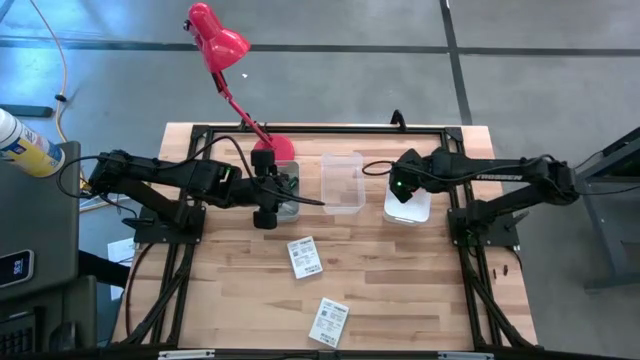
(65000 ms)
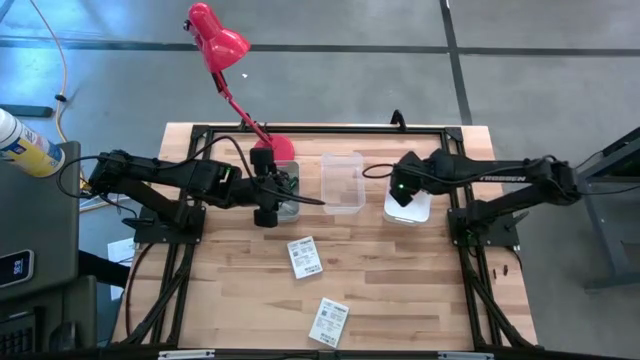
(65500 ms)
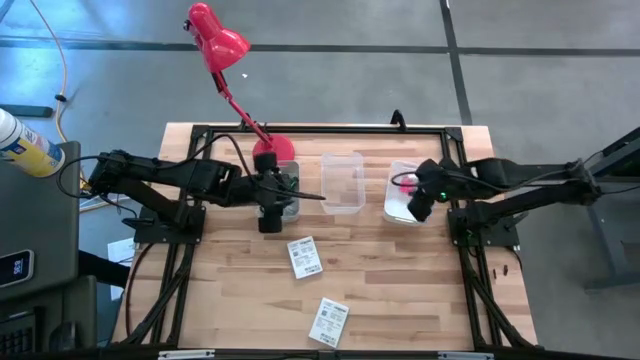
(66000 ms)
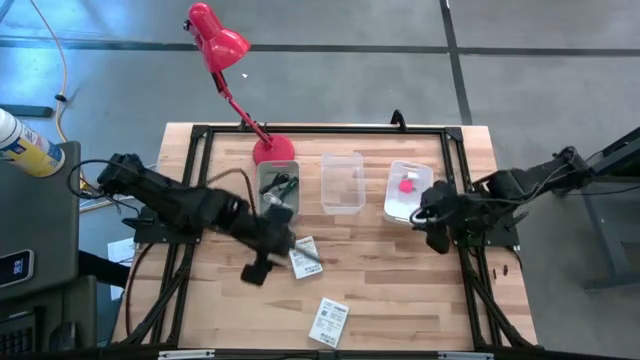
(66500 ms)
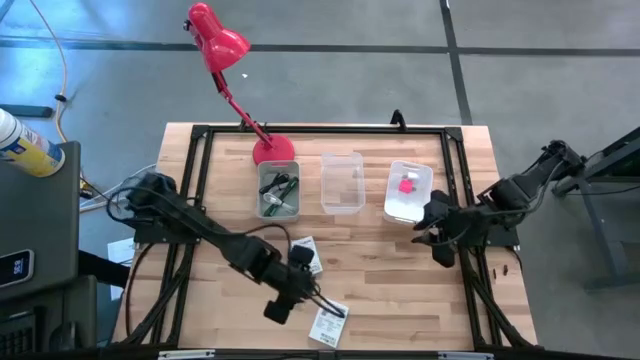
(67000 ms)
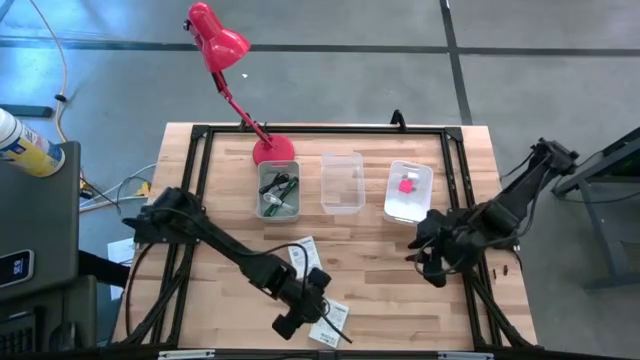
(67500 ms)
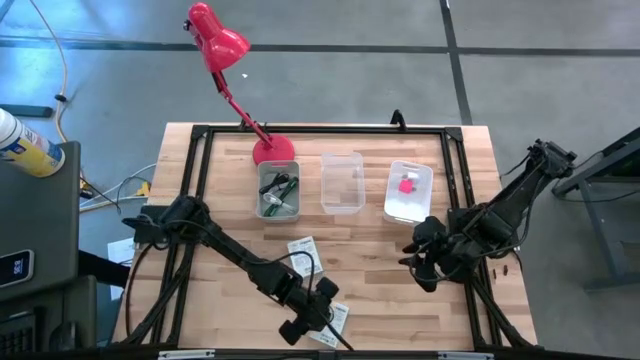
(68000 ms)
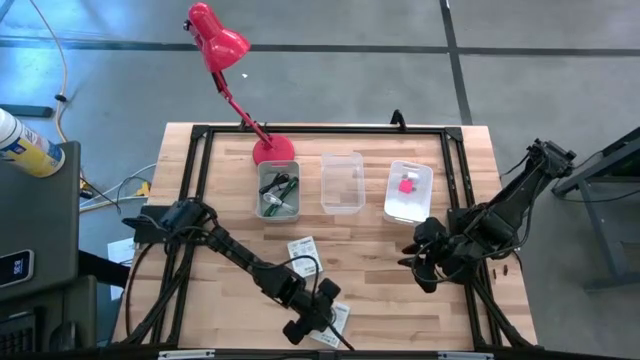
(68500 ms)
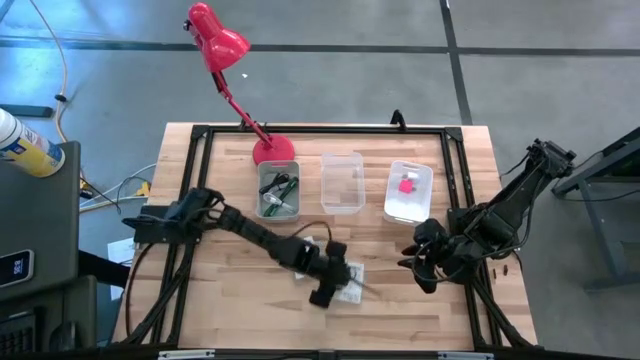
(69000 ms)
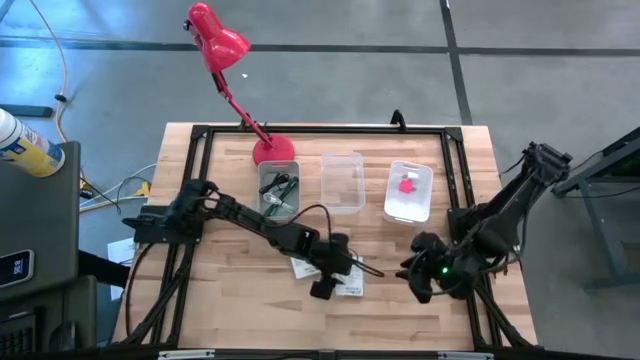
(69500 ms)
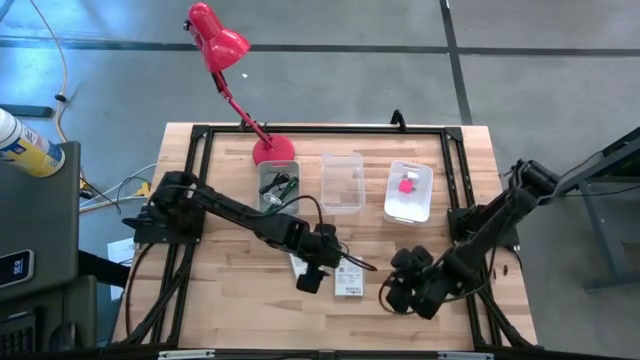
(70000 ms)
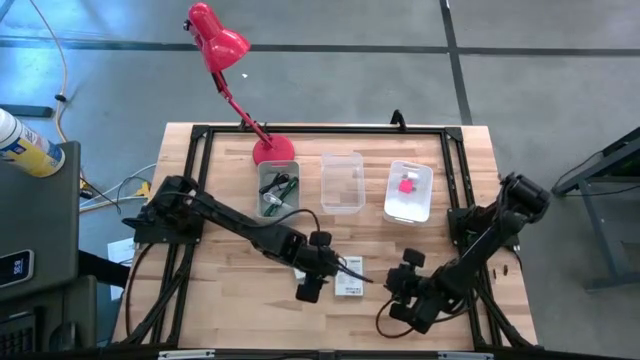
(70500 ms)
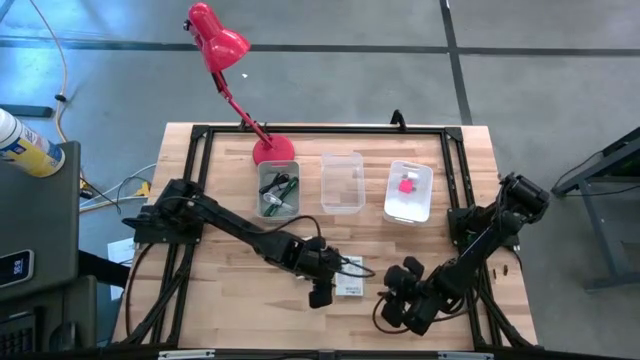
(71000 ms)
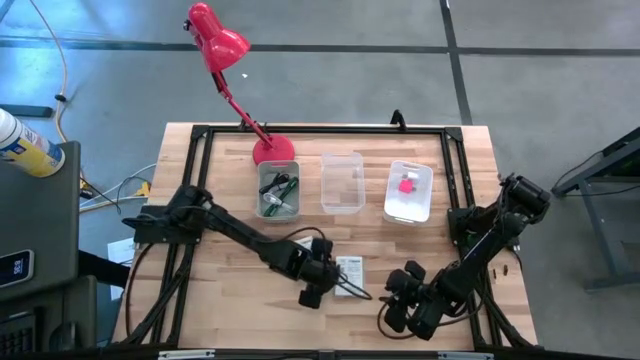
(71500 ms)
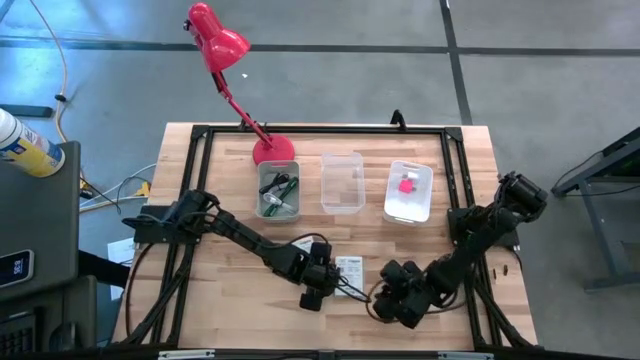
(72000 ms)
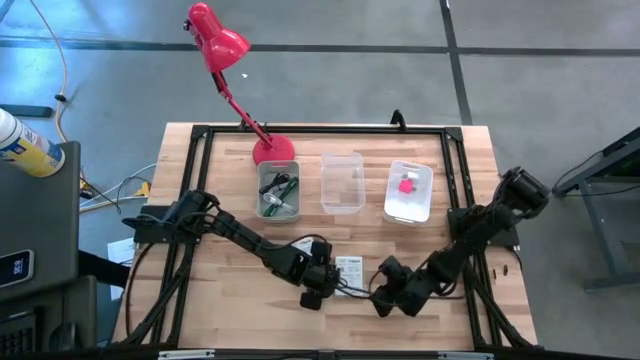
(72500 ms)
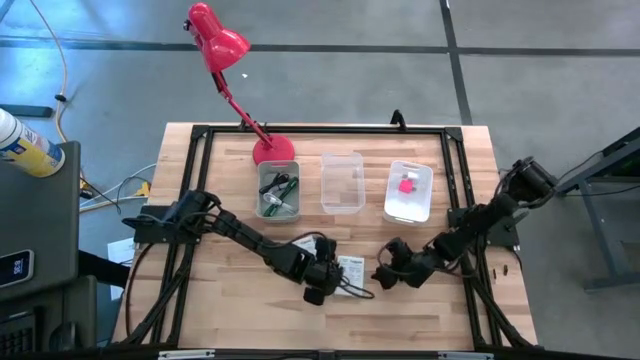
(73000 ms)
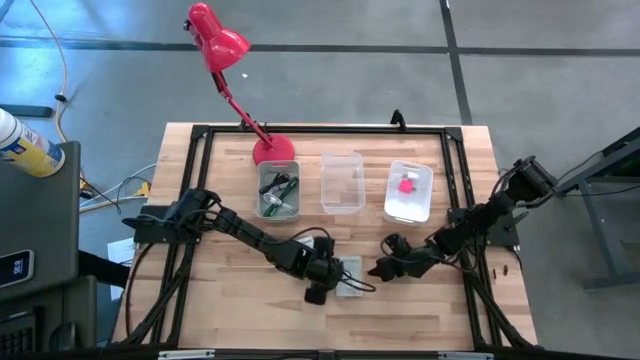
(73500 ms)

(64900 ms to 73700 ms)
Task: Pick and place items into bin
Put the right card reader box into the transparent bin

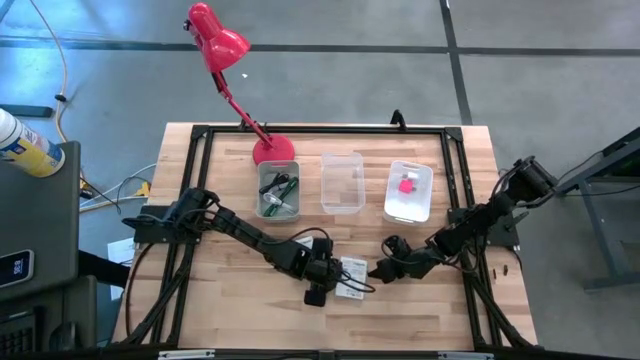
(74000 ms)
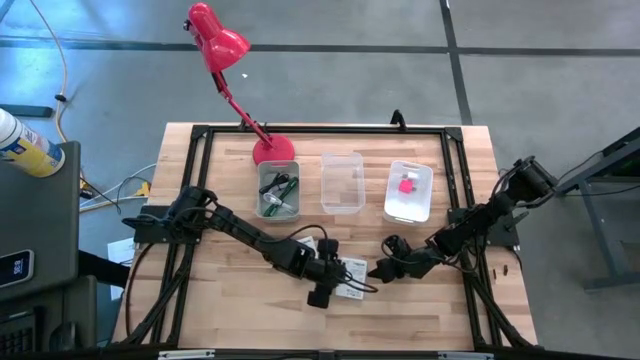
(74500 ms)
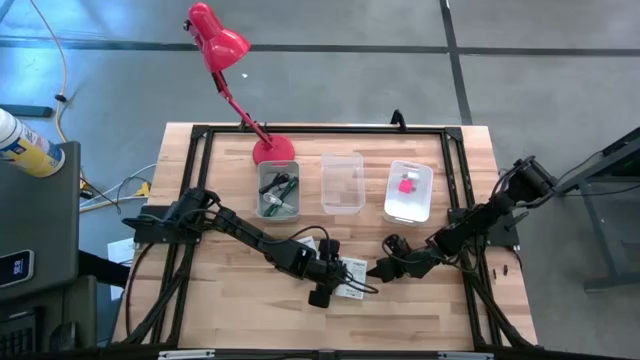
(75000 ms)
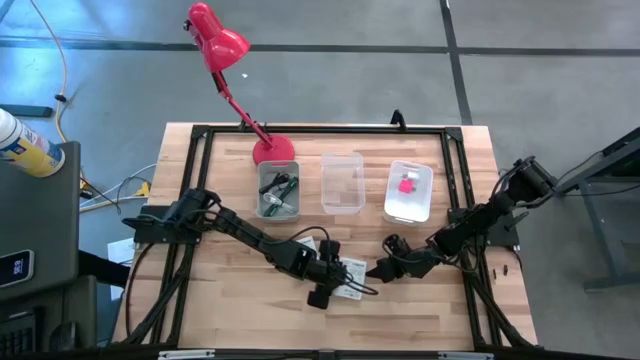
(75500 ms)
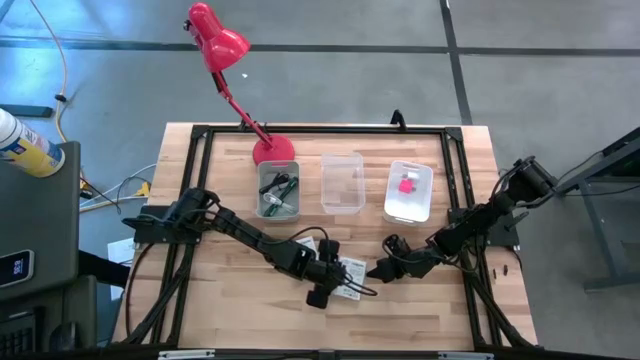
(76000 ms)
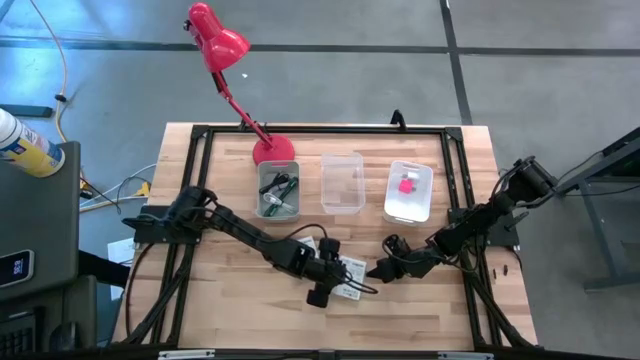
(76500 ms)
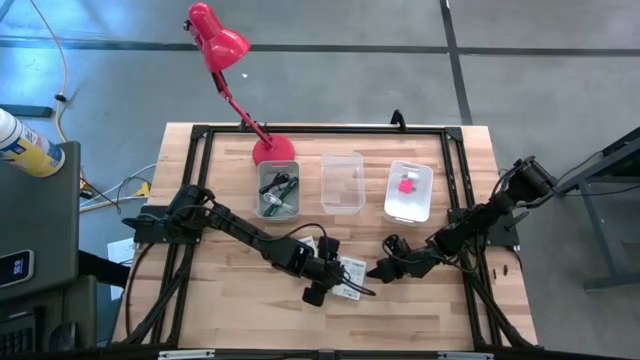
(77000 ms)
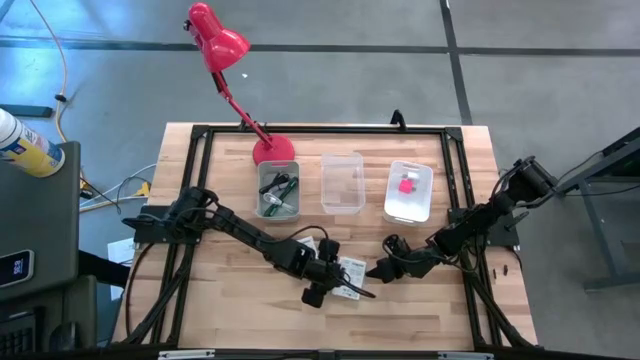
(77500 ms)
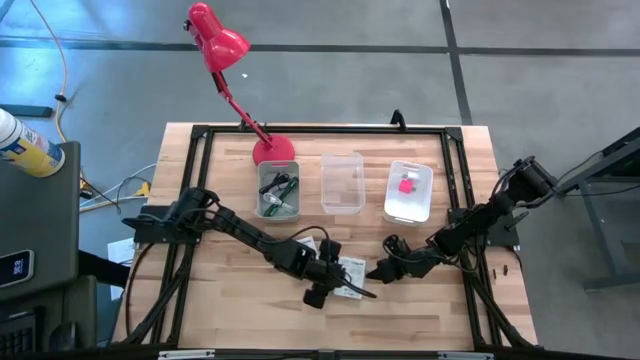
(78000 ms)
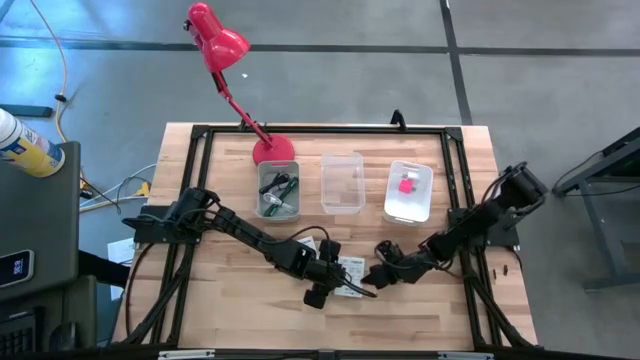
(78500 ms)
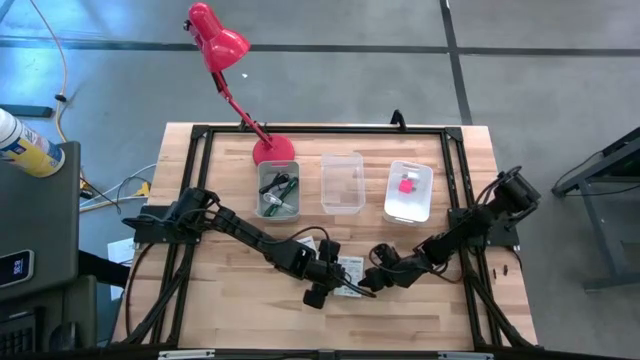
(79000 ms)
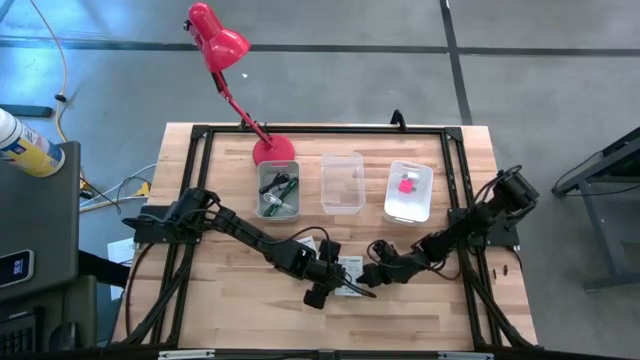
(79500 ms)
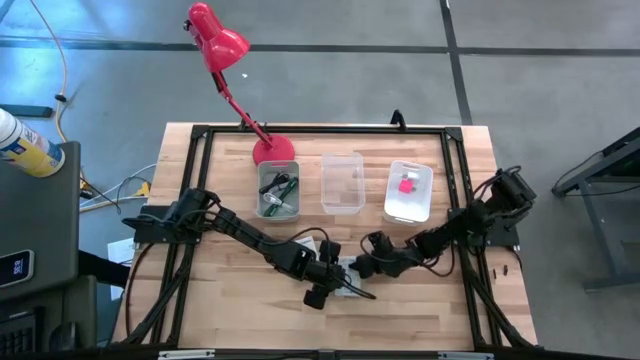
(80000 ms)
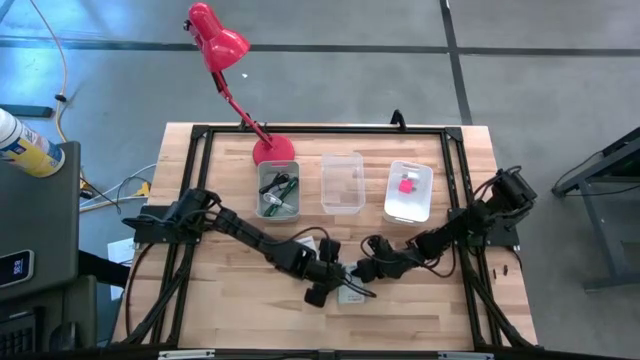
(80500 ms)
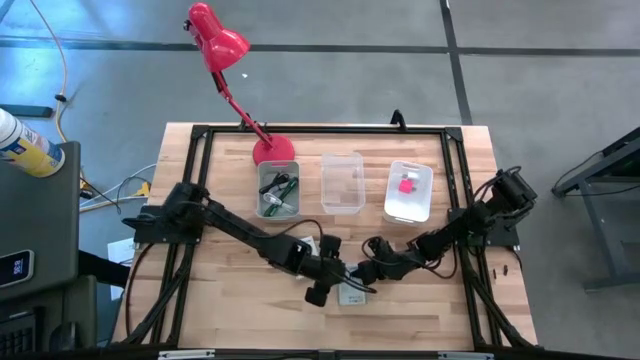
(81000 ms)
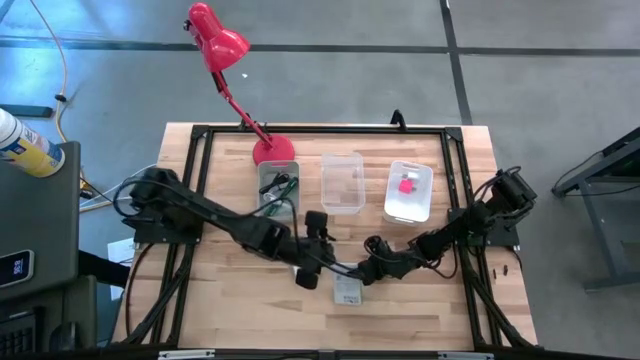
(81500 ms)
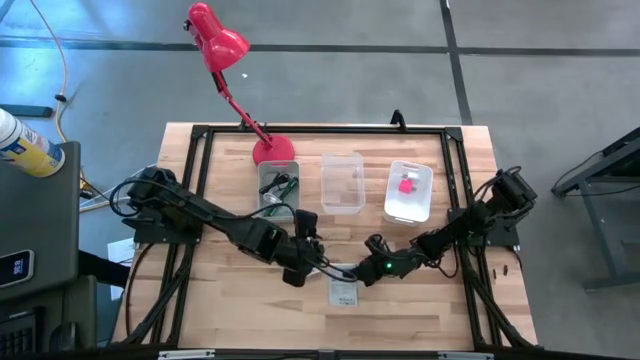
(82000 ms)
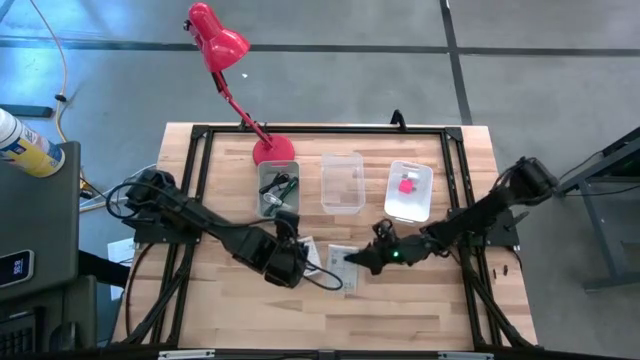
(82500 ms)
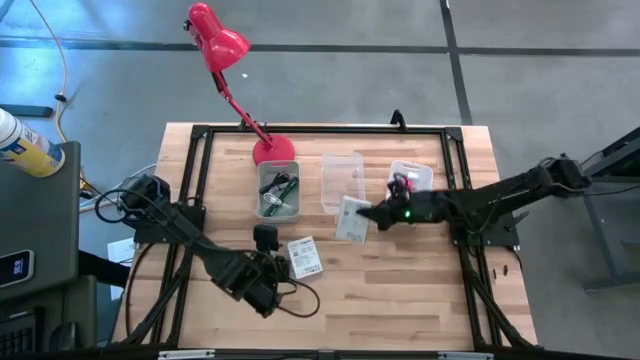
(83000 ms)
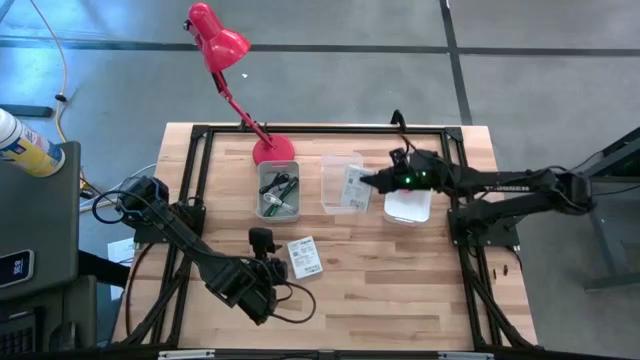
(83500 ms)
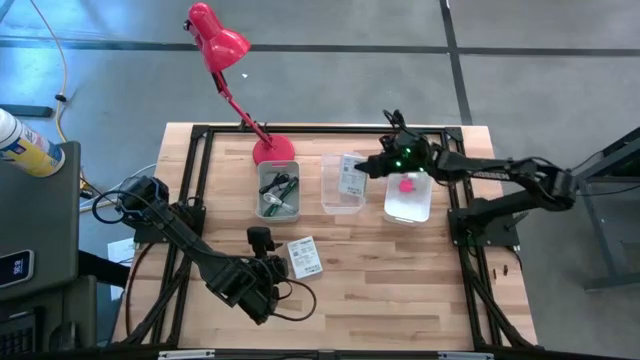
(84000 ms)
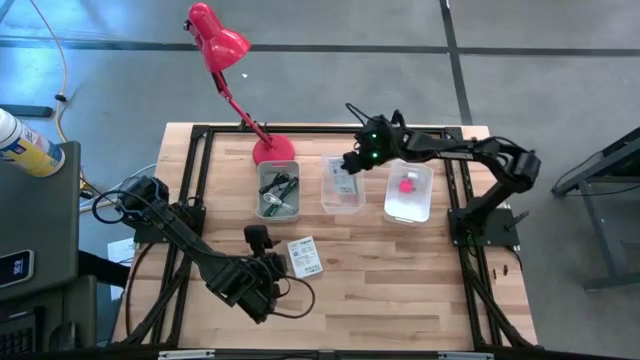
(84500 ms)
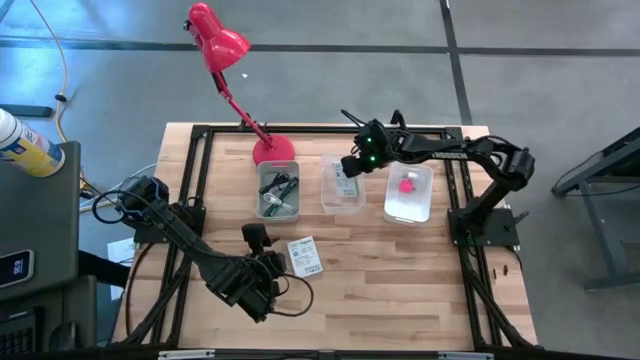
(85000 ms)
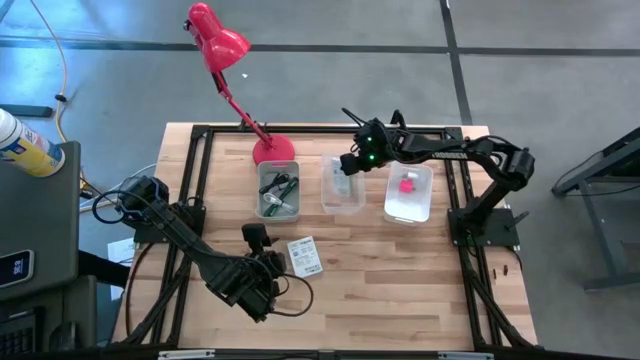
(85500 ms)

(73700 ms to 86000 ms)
Put the right card reader box into the transparent bin
